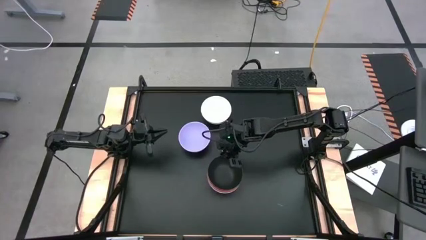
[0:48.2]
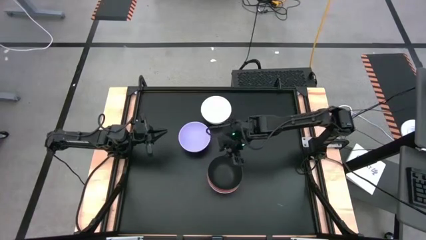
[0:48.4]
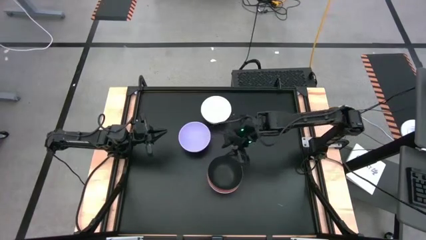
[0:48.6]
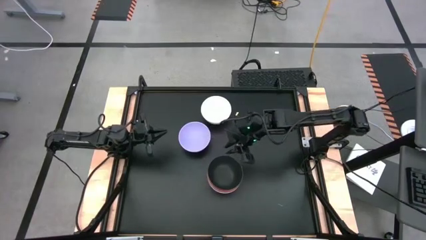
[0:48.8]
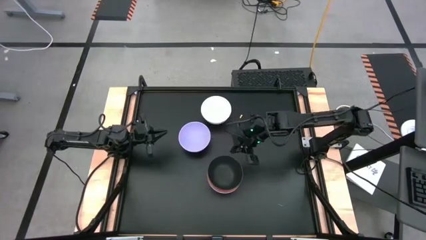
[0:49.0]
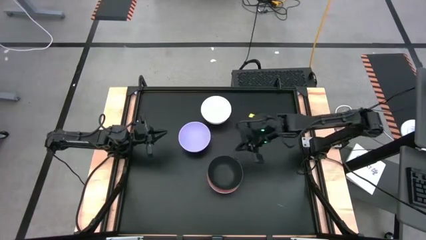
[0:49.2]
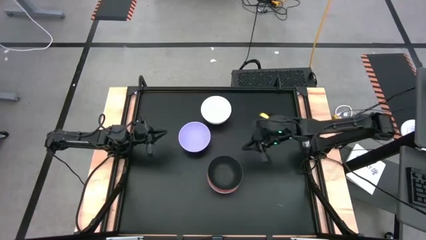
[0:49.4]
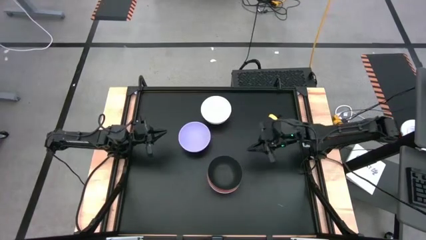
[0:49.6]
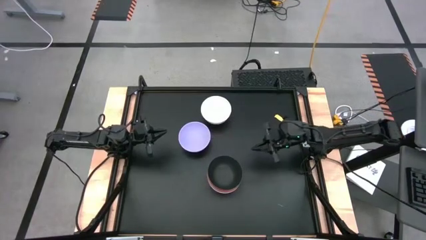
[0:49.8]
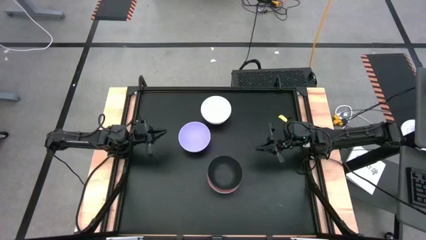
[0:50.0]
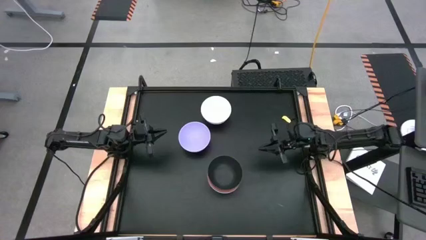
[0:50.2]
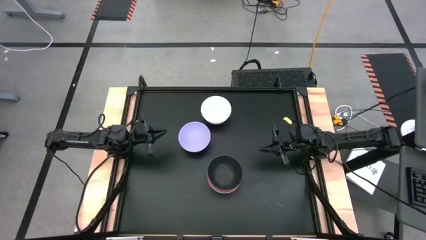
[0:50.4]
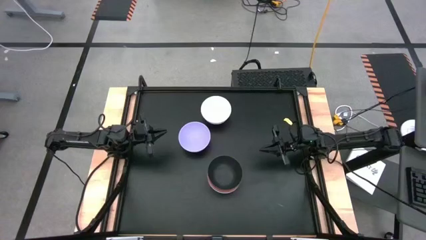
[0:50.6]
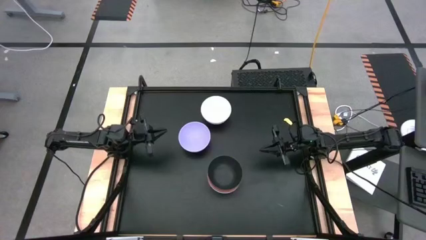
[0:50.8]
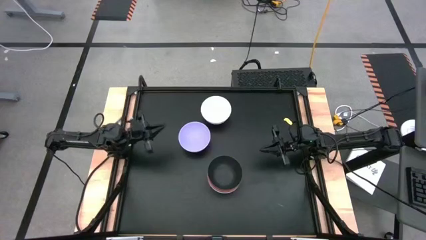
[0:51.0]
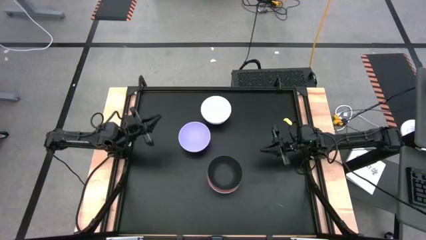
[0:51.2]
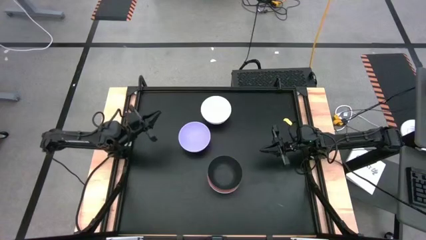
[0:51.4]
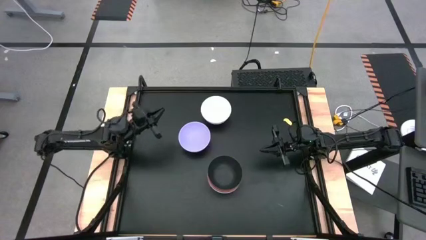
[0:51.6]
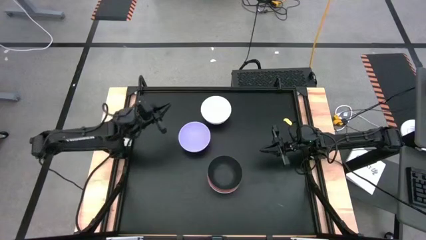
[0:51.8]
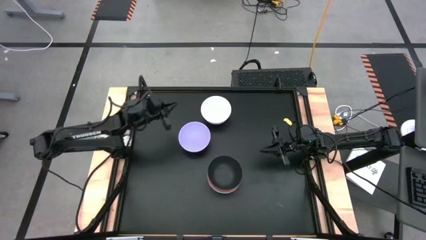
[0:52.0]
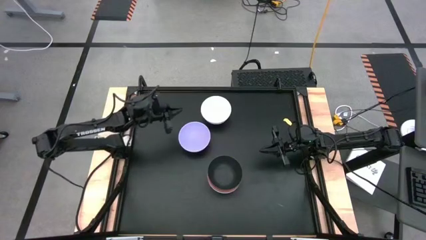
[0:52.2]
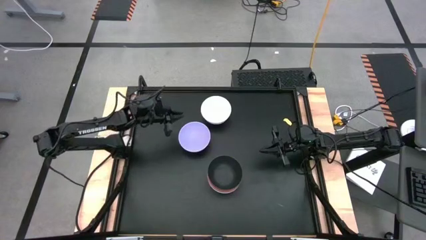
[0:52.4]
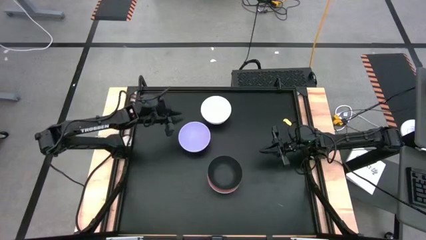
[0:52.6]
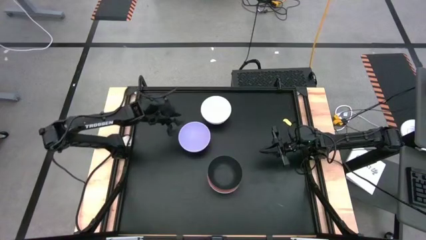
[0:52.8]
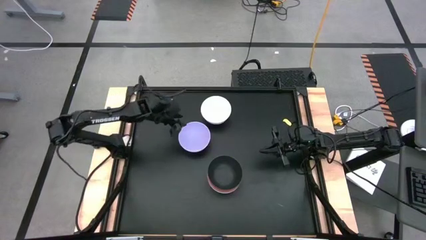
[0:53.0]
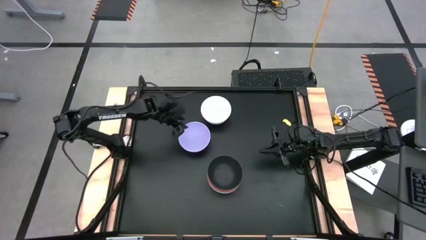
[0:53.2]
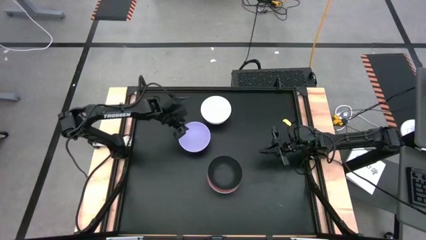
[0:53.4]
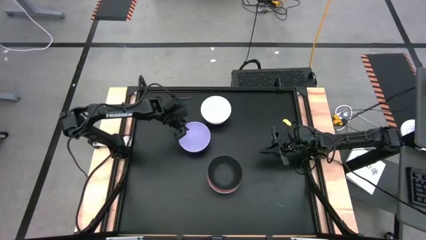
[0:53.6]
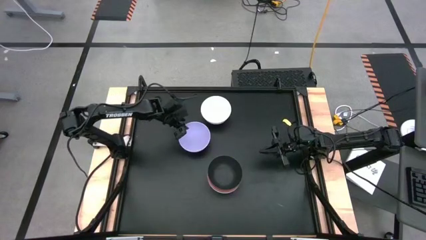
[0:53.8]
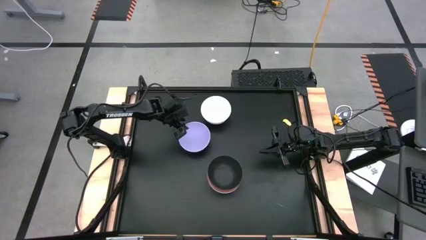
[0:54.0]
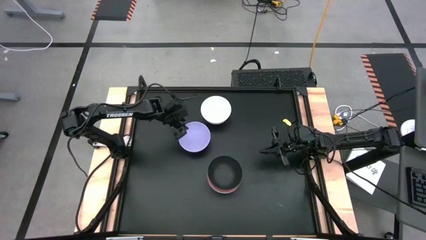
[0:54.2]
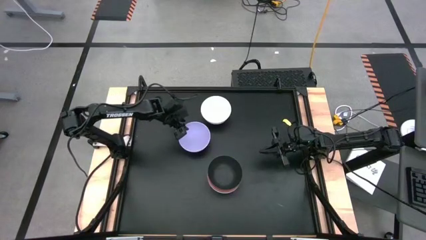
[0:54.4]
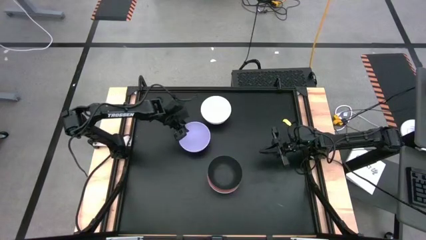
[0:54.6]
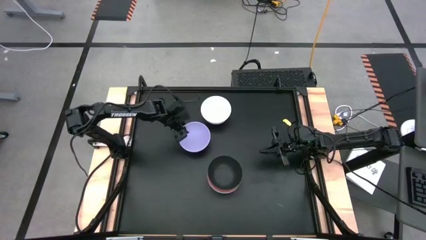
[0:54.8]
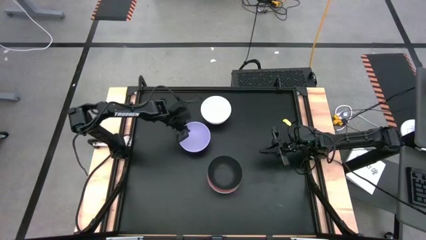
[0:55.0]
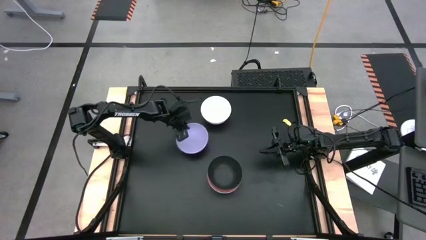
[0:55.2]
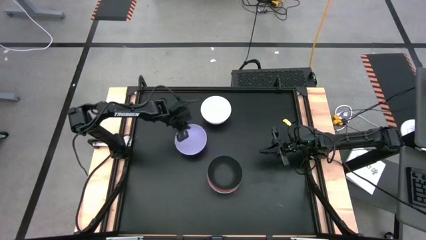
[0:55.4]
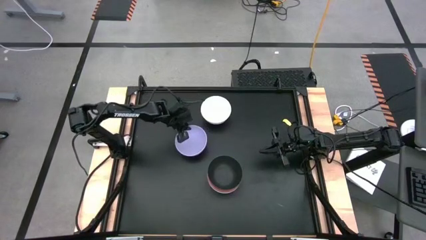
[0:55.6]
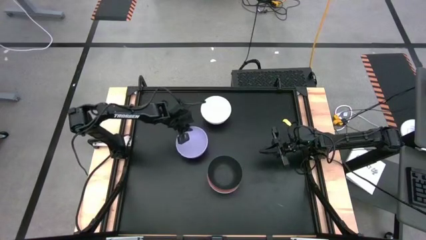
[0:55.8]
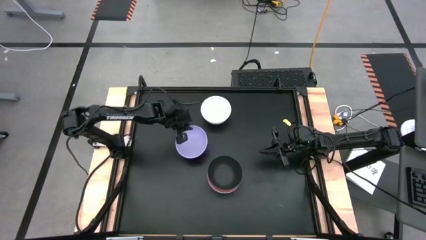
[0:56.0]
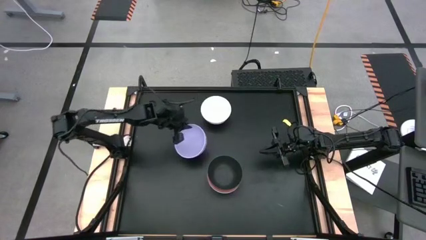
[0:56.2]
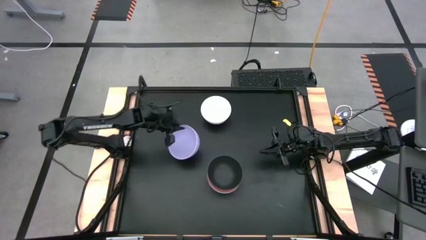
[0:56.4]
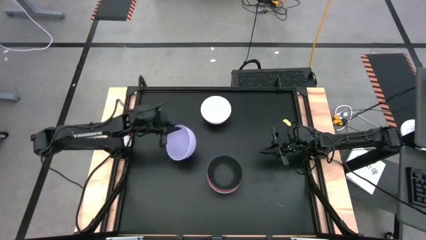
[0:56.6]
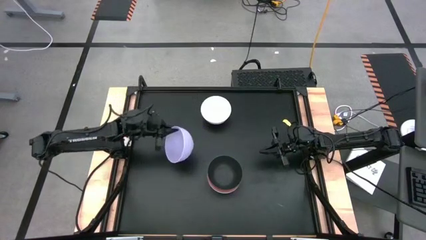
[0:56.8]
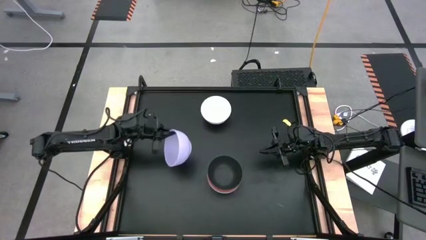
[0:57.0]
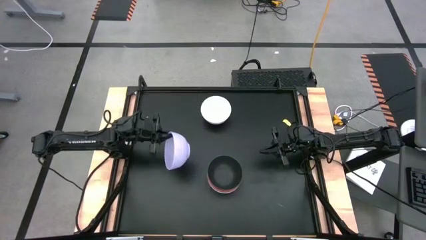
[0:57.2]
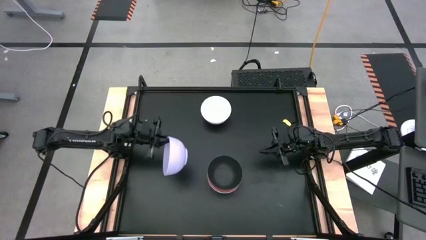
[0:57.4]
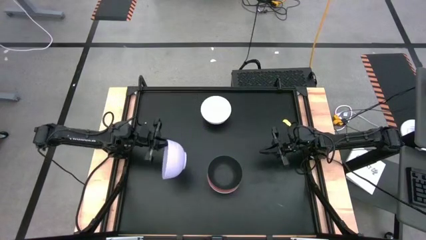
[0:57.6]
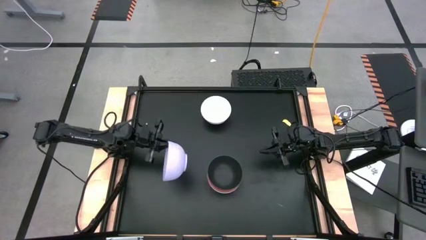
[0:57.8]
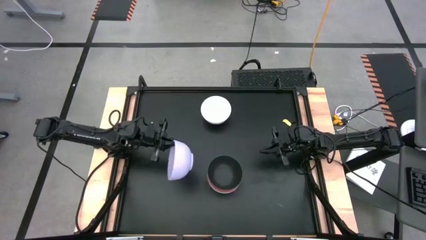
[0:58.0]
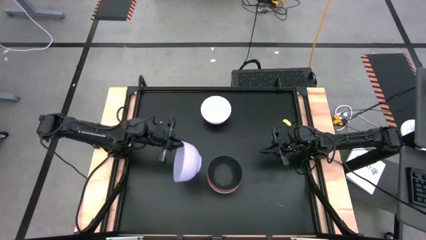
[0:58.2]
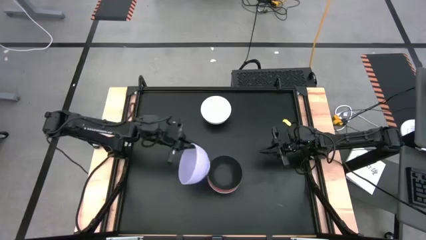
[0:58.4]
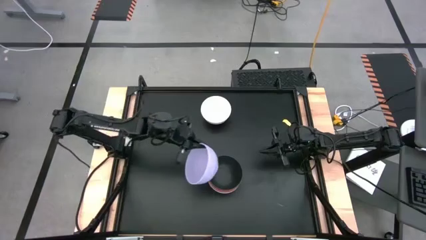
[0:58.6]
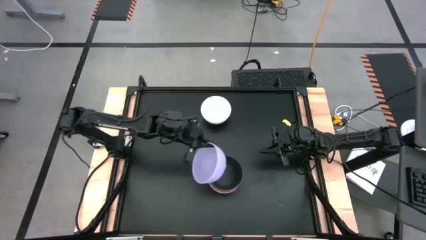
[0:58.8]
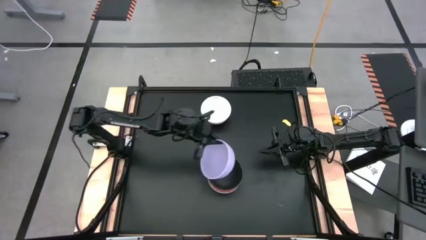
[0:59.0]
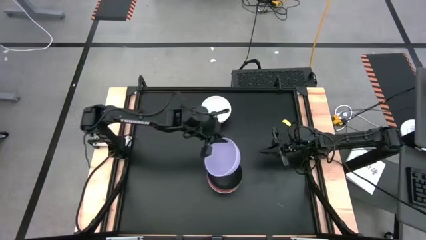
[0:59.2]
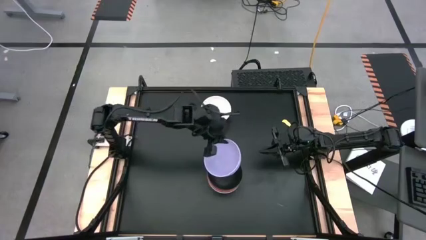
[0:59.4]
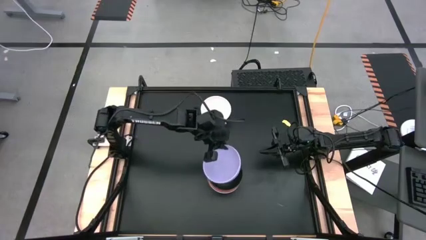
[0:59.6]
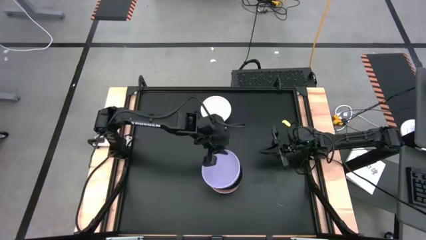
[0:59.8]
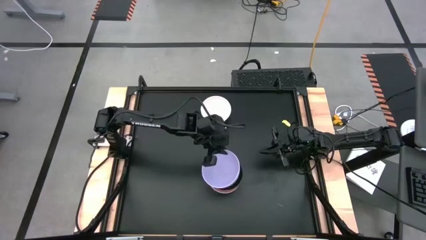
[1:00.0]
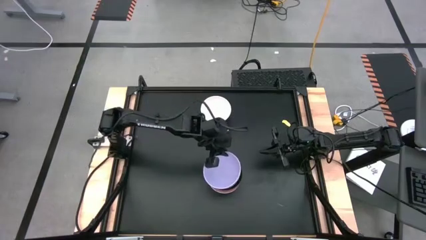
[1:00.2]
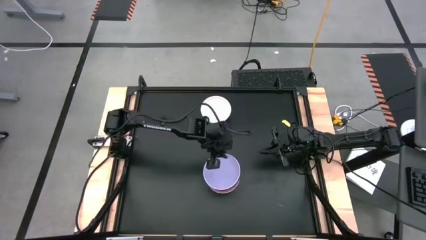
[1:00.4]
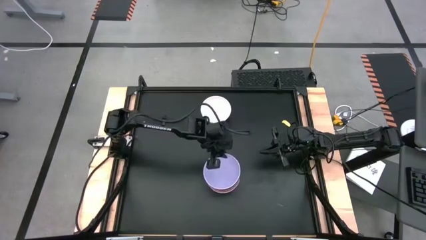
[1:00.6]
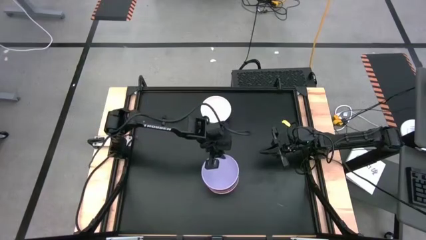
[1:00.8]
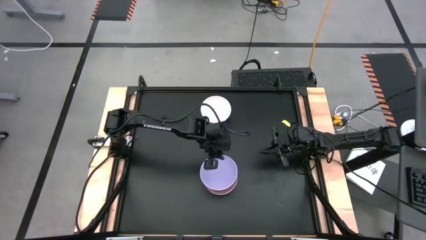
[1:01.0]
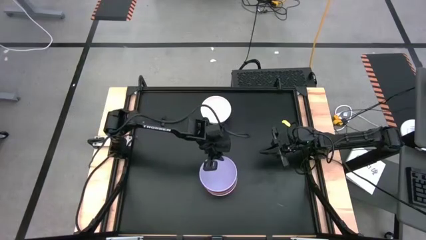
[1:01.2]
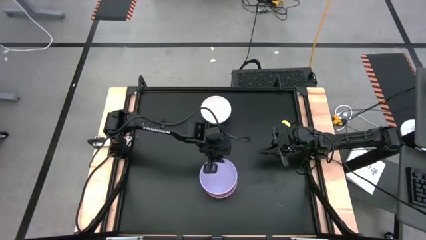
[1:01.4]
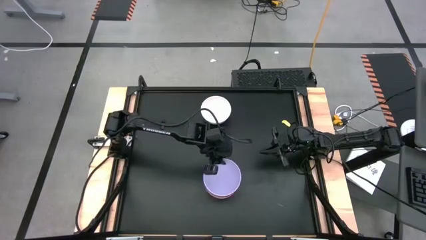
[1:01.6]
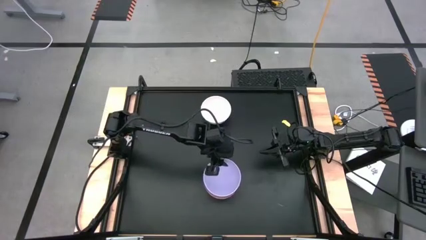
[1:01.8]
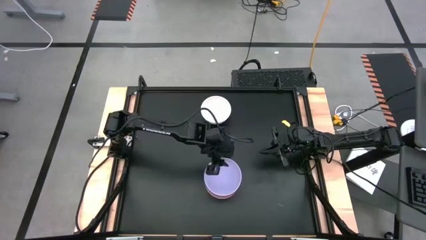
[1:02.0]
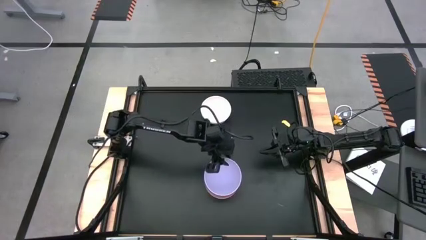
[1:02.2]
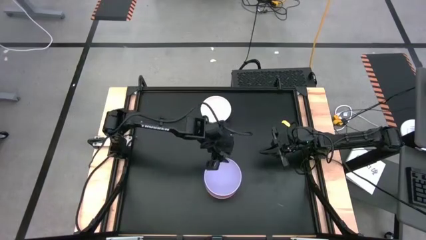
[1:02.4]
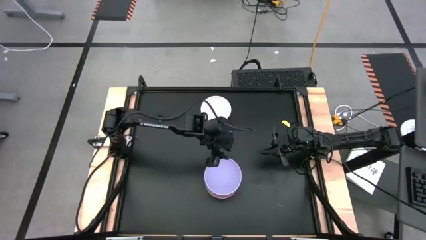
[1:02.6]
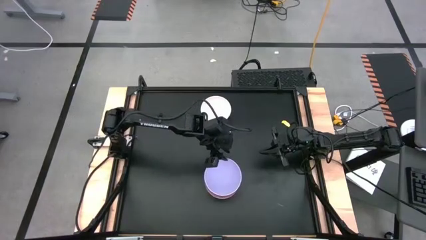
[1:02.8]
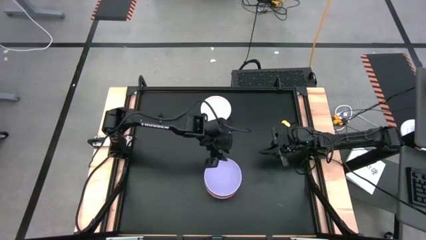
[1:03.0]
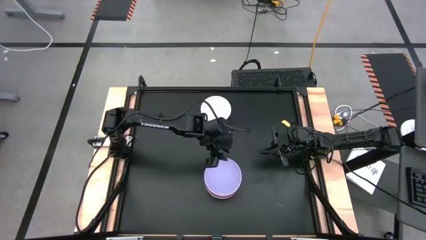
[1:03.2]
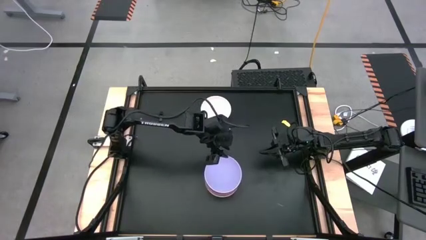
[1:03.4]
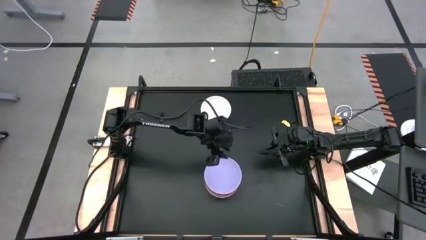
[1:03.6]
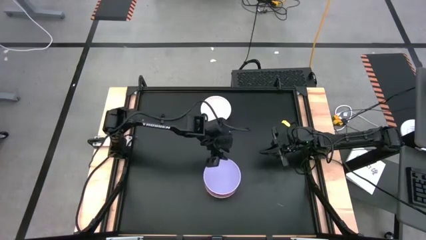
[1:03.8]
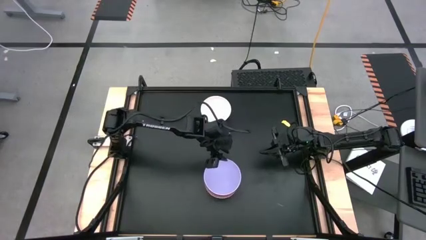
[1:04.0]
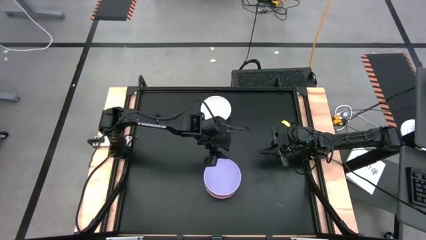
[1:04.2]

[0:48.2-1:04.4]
Task: Nest bowls inside each other
Stack the purple bowl on top of the black bowl
